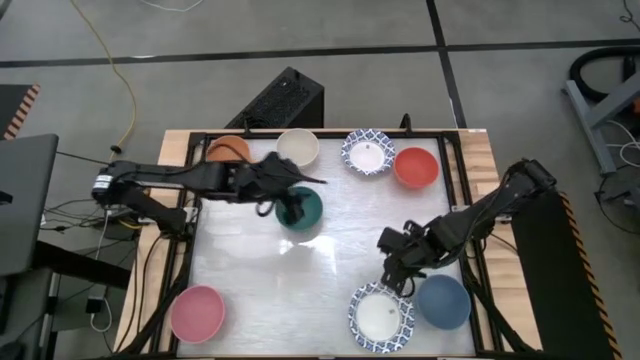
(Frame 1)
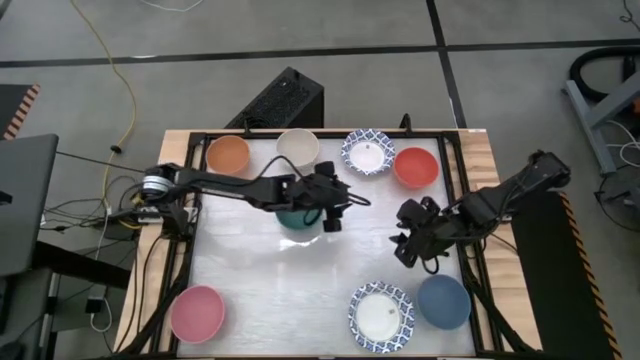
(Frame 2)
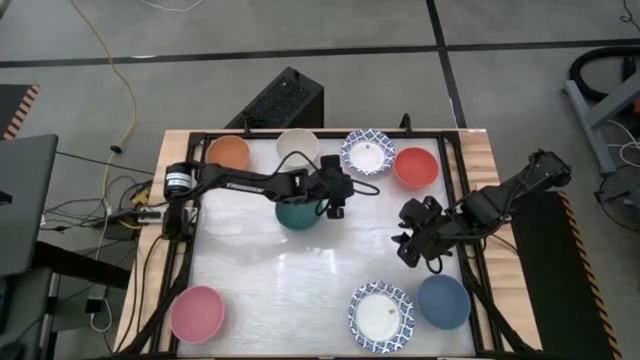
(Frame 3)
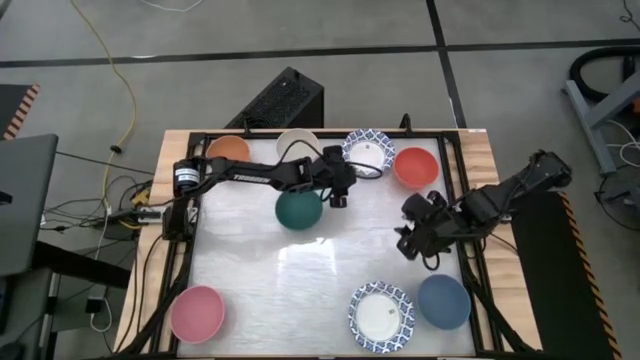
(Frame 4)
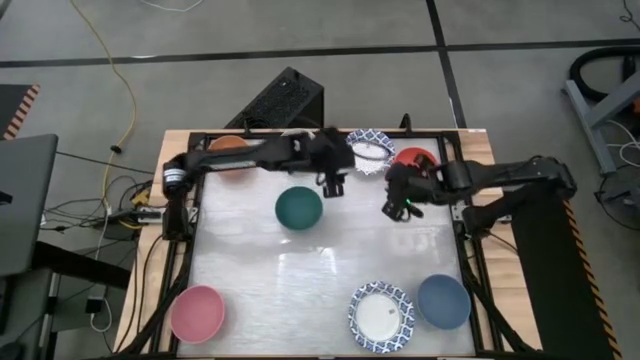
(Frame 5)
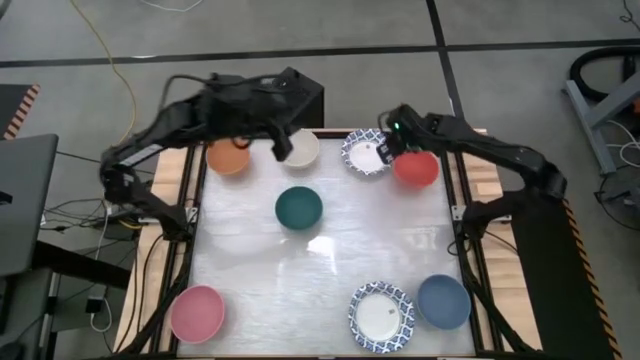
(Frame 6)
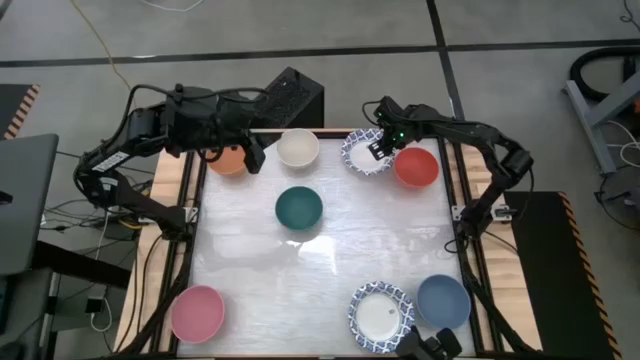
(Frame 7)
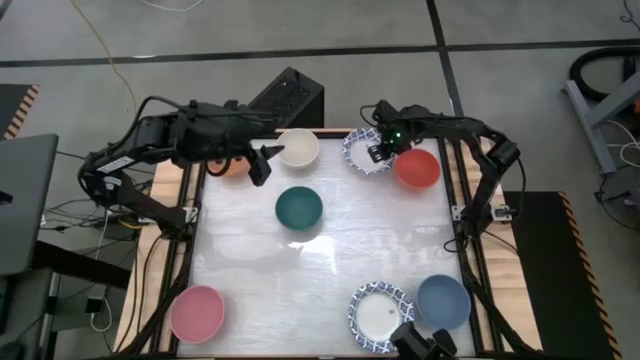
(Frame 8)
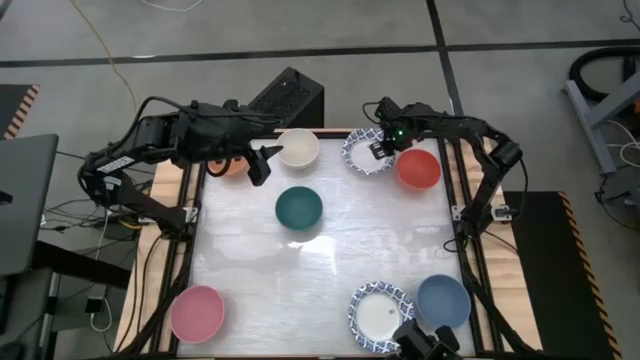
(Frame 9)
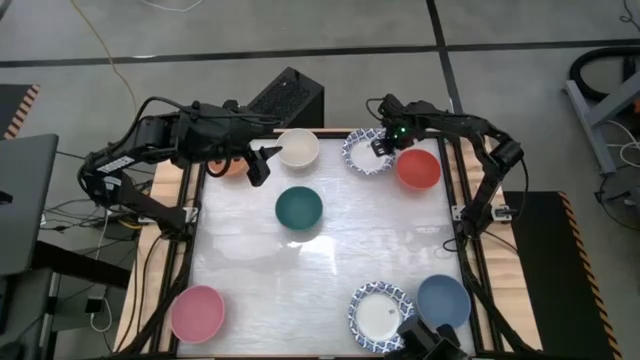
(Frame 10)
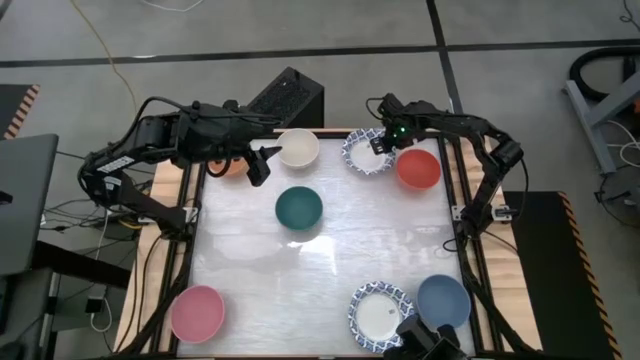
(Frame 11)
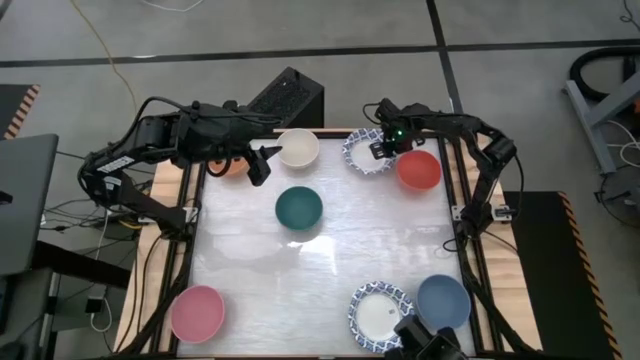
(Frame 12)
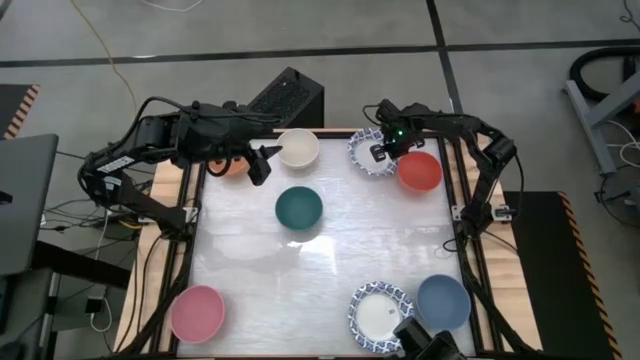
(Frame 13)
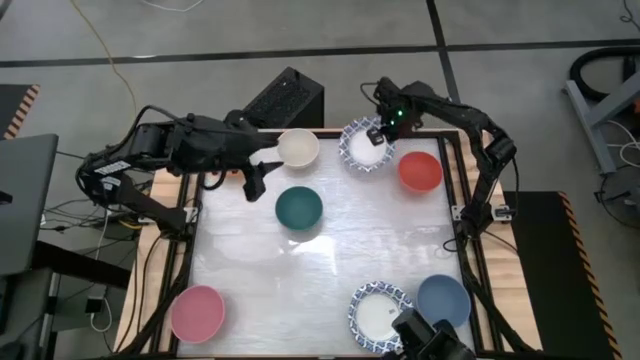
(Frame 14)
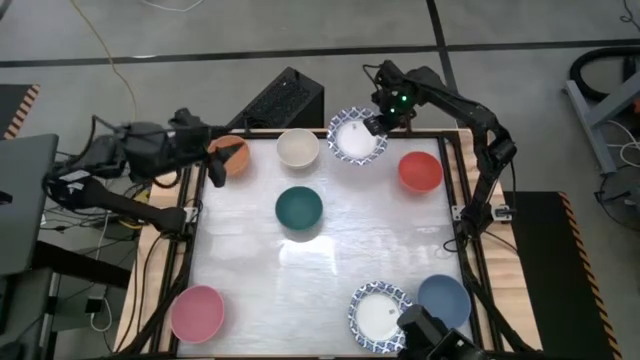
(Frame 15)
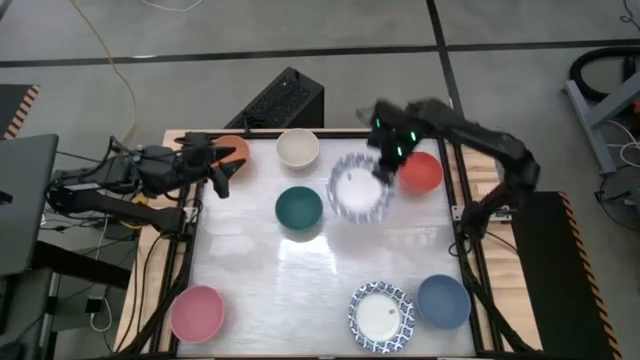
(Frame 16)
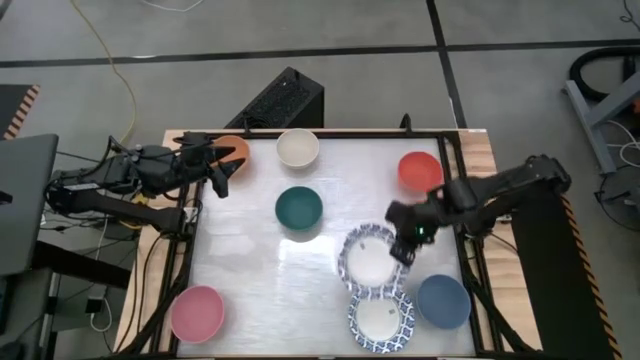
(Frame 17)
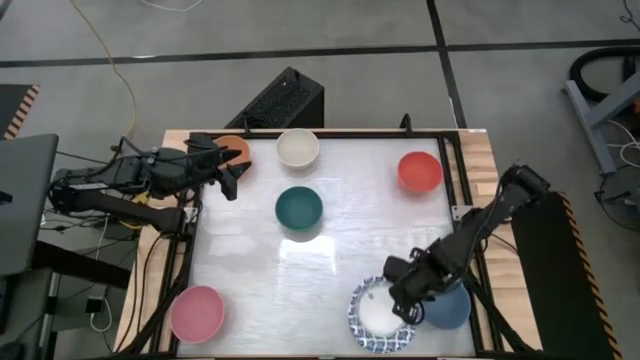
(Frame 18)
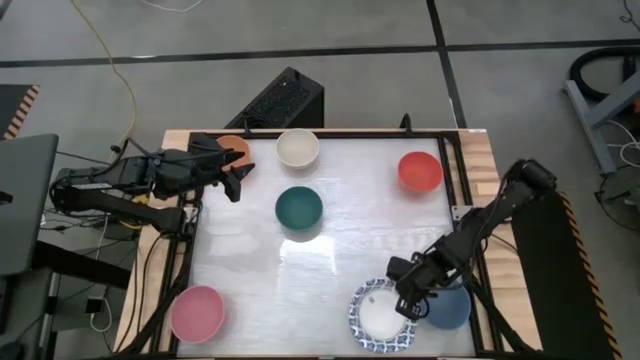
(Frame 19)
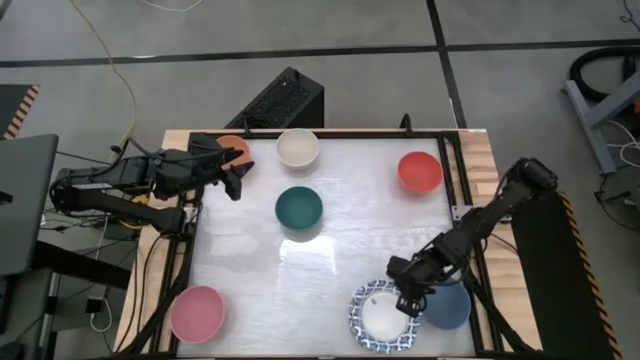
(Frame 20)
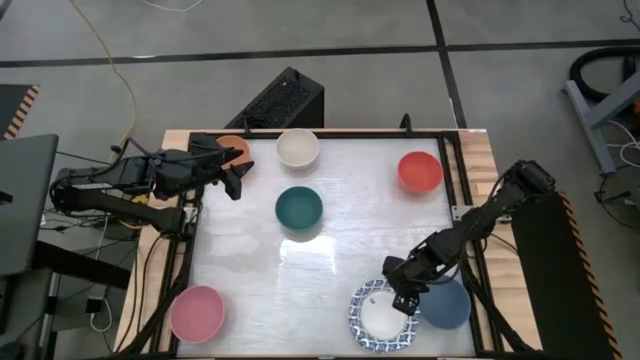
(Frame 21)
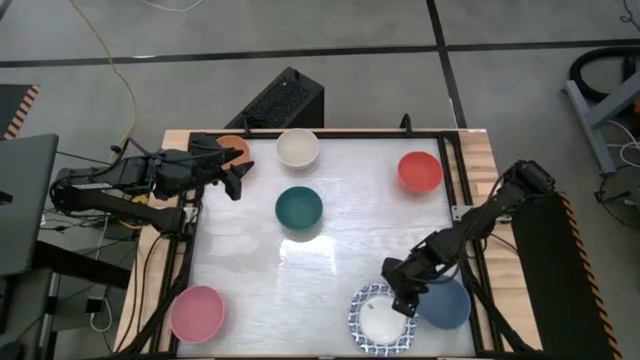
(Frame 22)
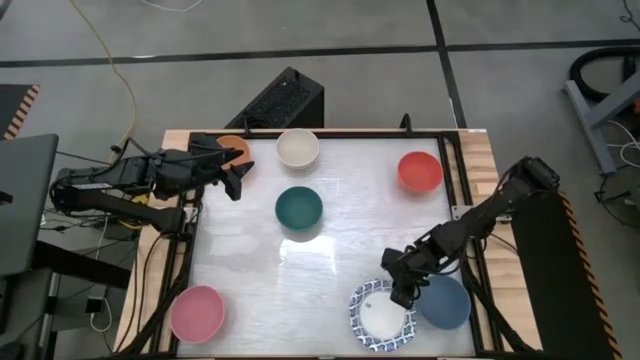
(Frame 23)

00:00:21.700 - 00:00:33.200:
Stack the top blue patterned bowl on top of the other bottom blue patterned bowl

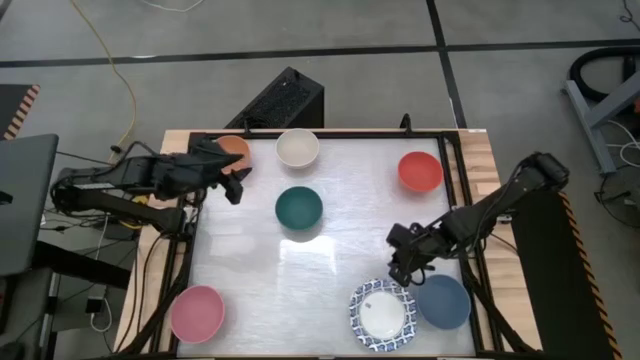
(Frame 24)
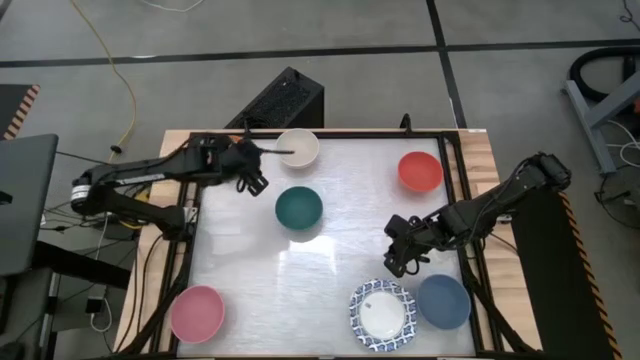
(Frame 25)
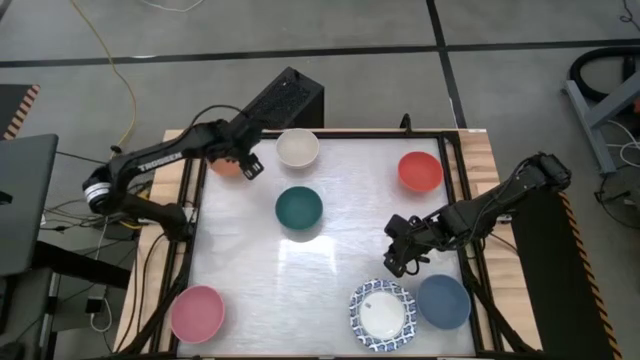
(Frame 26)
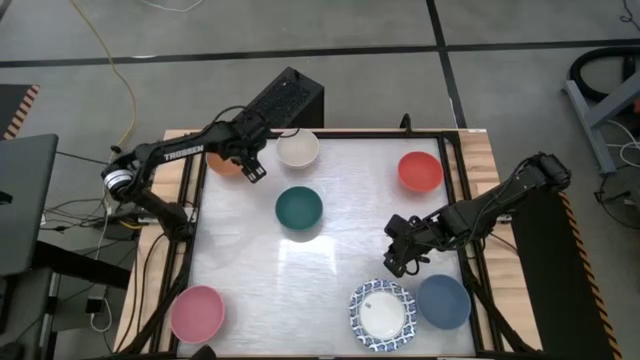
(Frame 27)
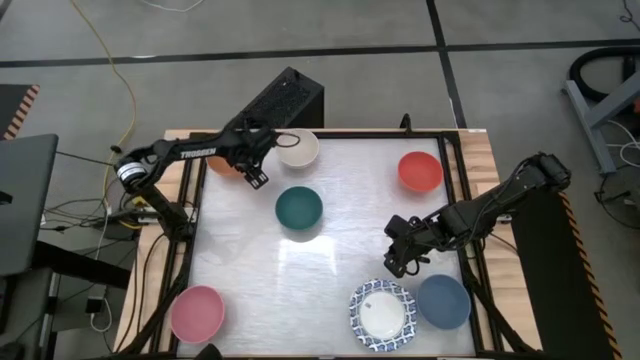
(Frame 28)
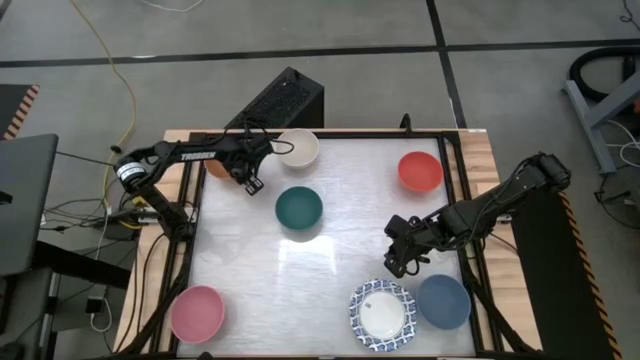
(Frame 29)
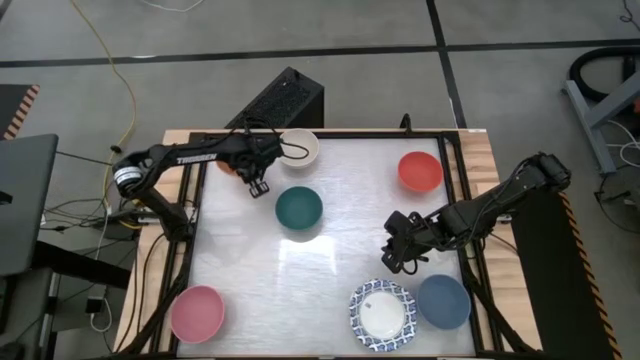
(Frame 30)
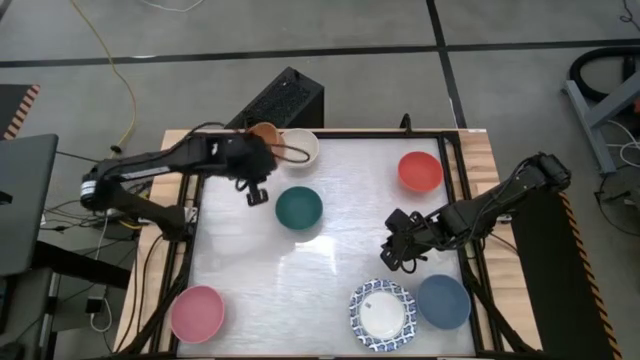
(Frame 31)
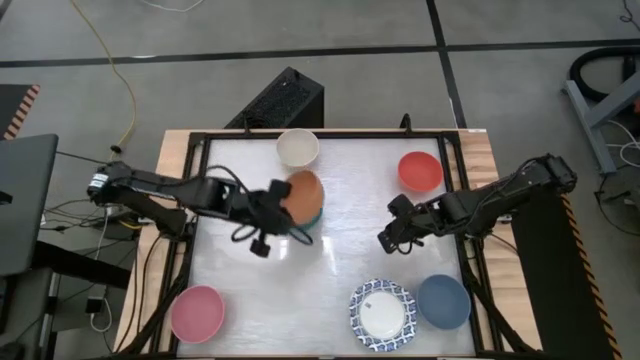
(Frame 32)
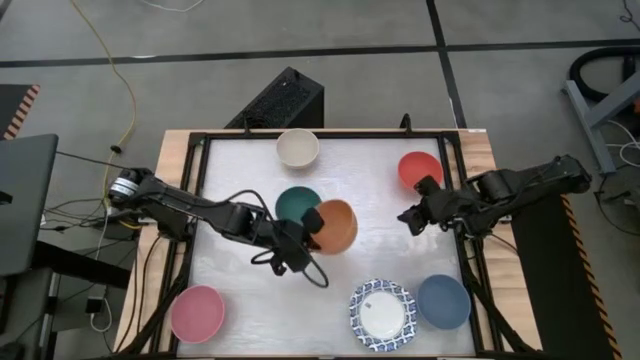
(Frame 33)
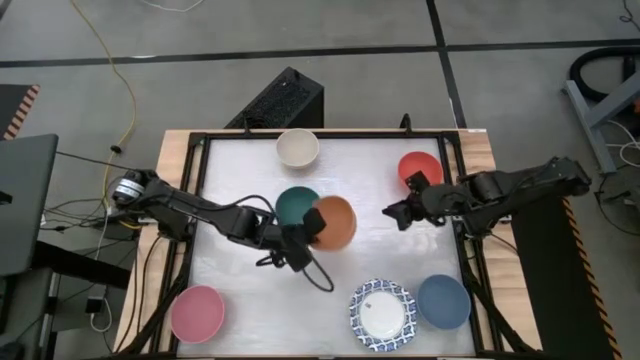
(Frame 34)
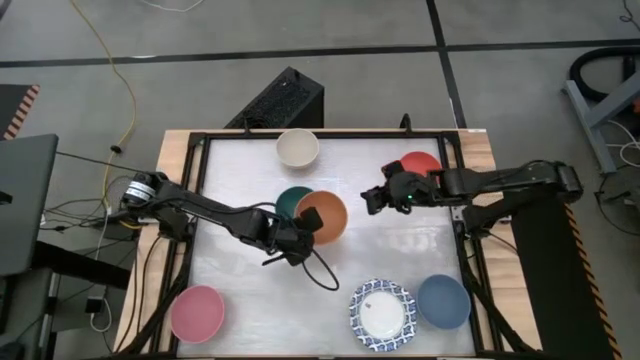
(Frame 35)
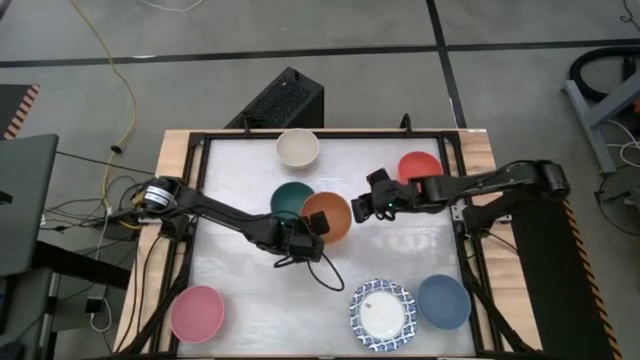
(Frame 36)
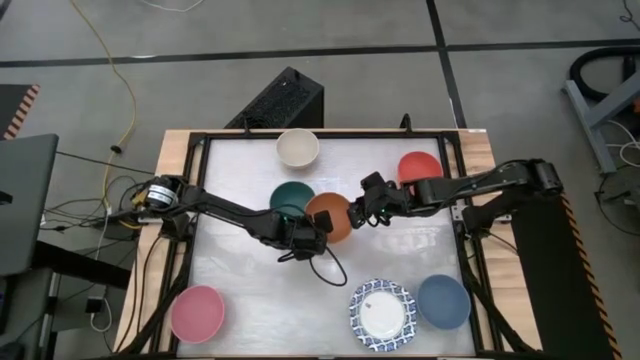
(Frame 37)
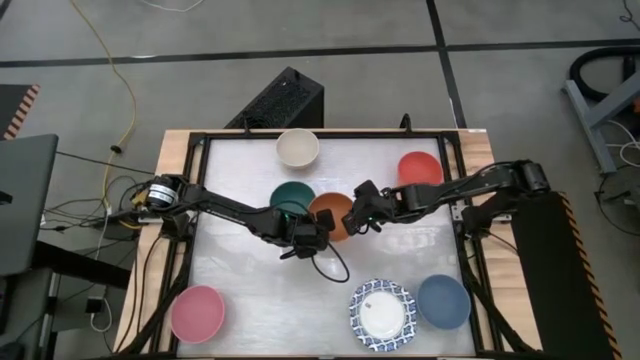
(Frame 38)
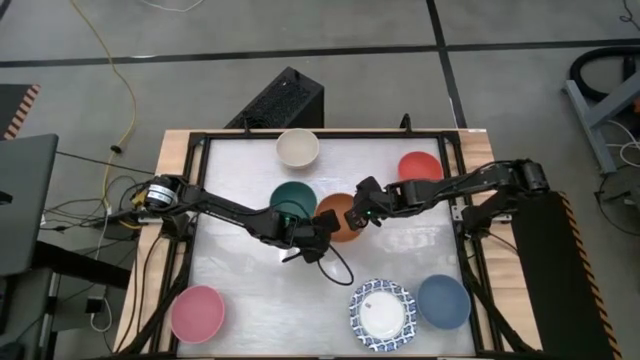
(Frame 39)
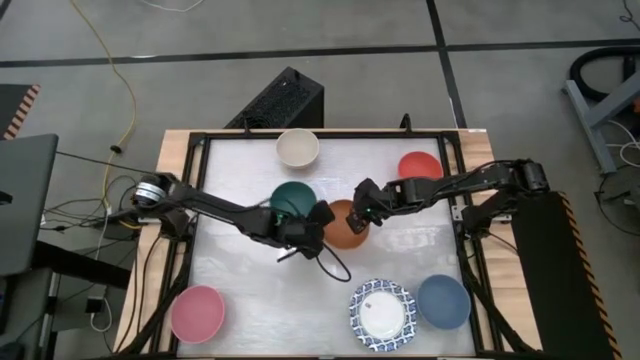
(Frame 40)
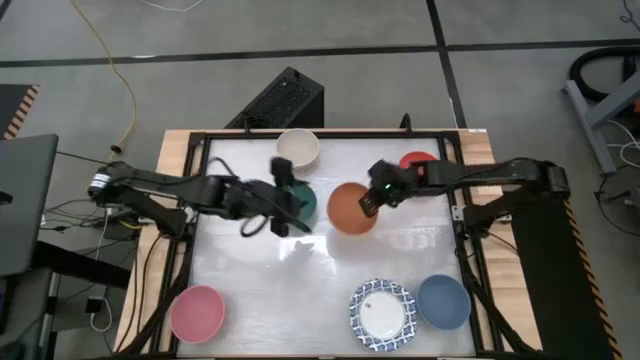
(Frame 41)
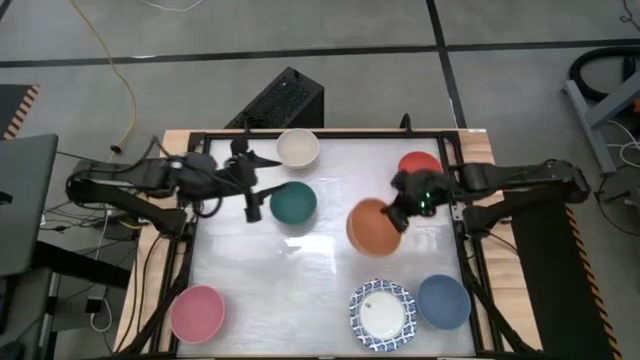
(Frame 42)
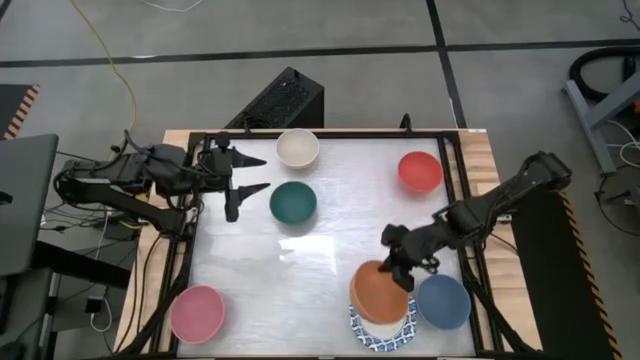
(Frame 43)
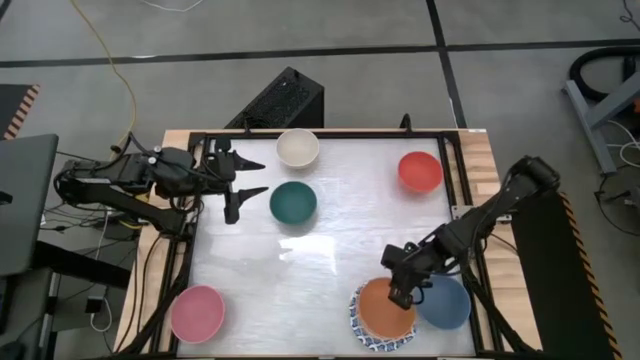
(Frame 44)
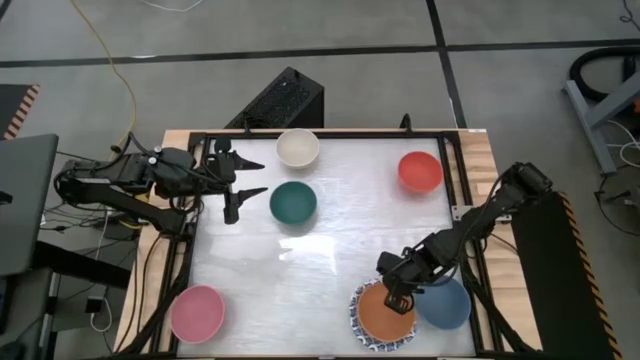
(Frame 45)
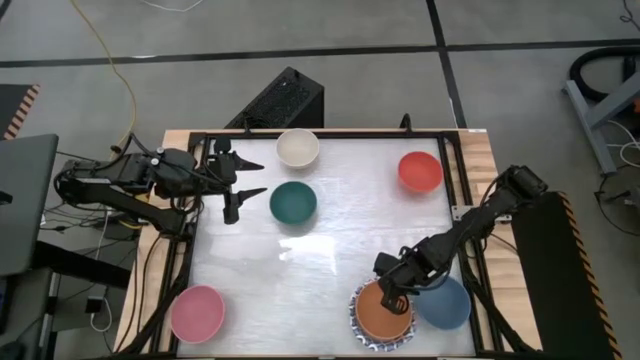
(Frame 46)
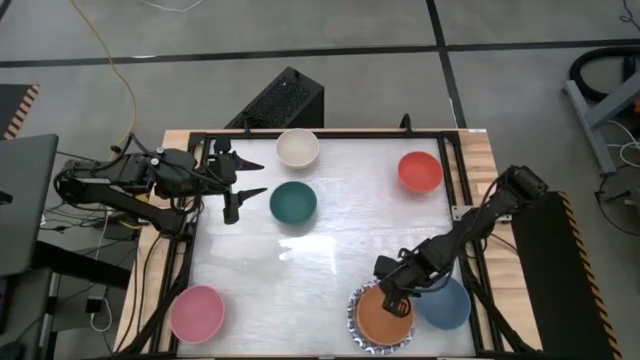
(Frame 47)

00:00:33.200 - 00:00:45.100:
Stack the light orange bowl on top of the blue patterned bowl
